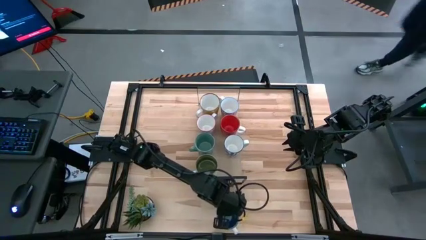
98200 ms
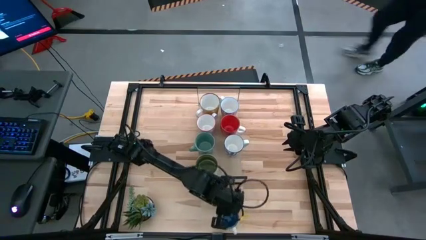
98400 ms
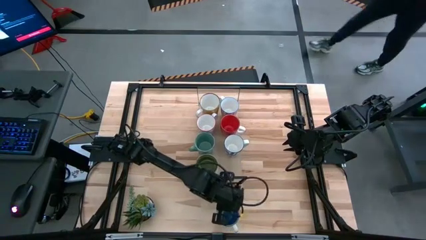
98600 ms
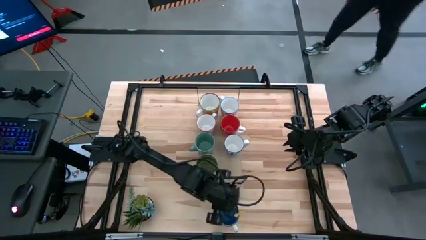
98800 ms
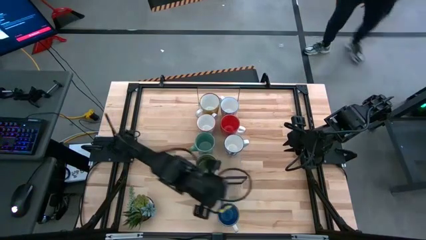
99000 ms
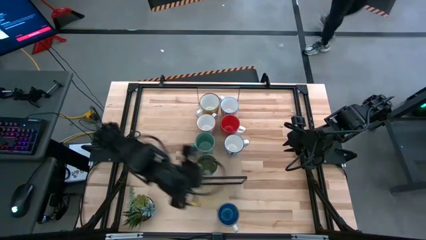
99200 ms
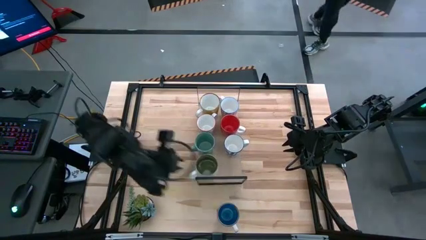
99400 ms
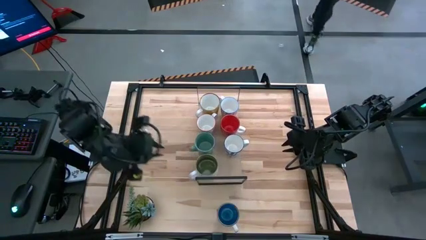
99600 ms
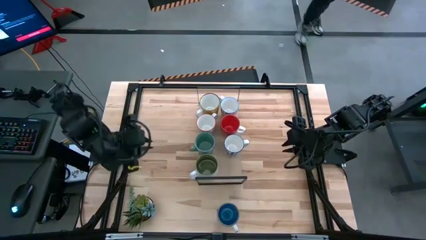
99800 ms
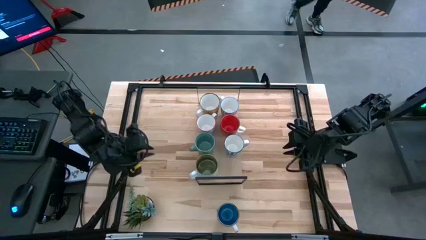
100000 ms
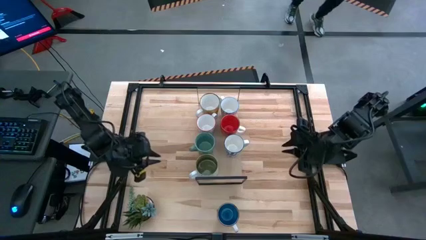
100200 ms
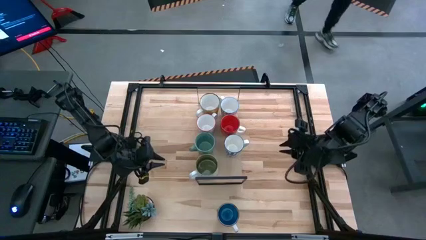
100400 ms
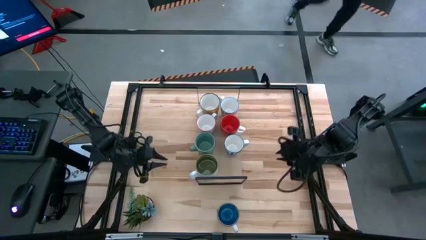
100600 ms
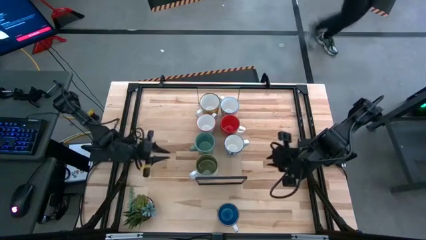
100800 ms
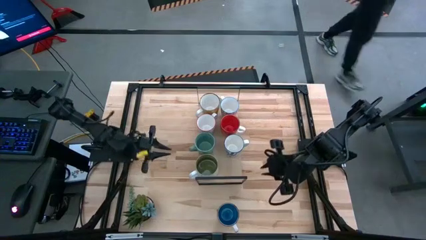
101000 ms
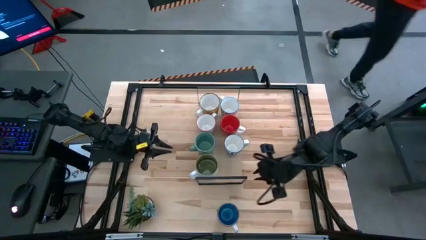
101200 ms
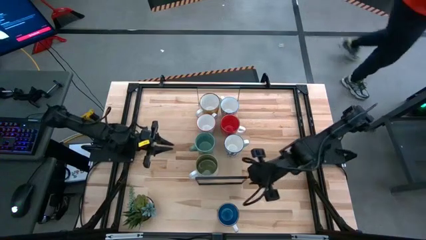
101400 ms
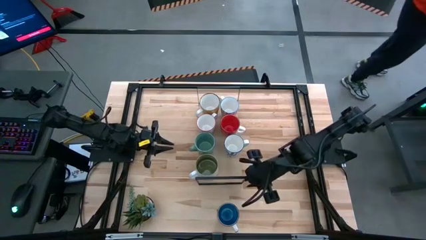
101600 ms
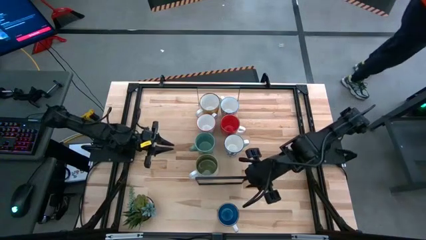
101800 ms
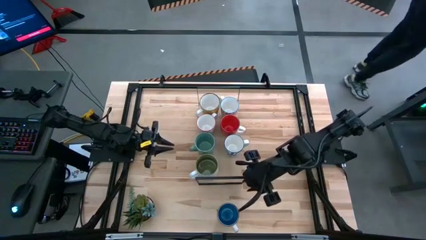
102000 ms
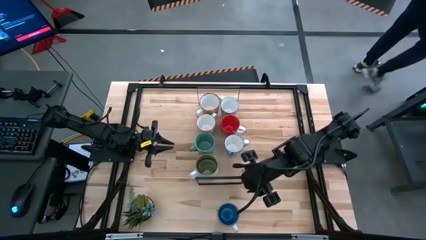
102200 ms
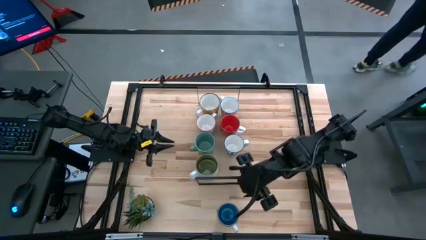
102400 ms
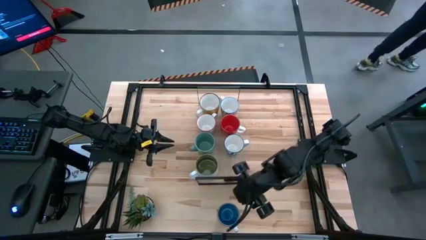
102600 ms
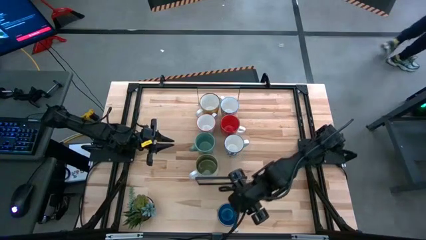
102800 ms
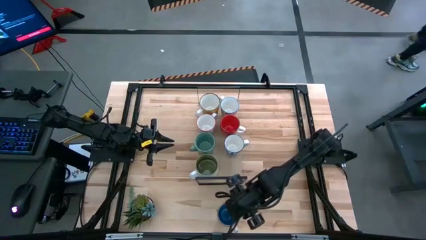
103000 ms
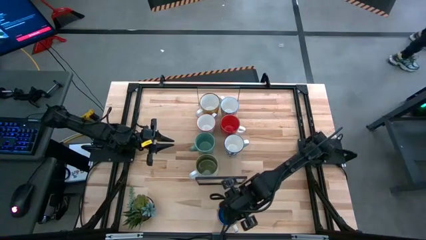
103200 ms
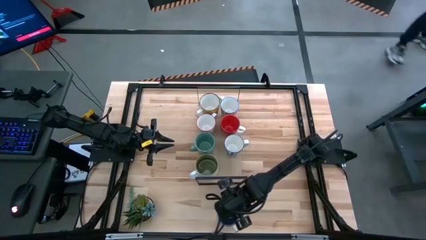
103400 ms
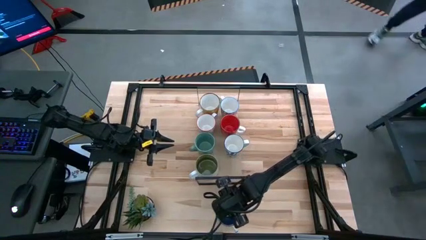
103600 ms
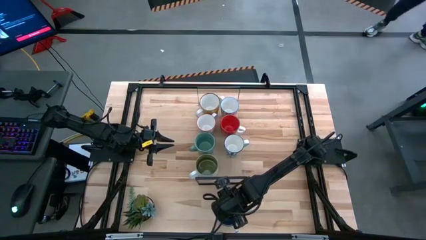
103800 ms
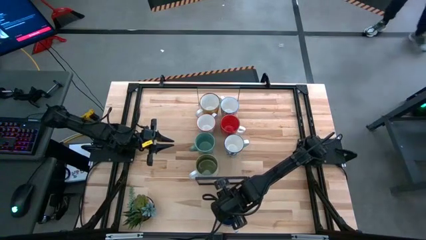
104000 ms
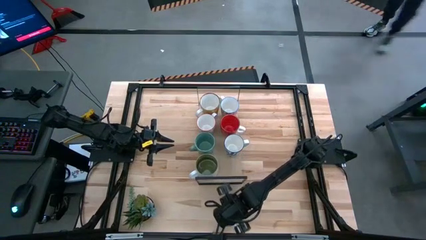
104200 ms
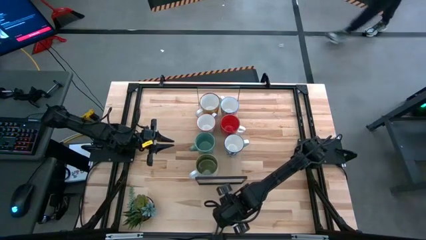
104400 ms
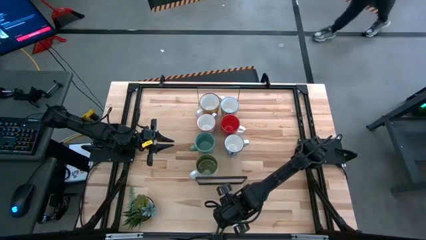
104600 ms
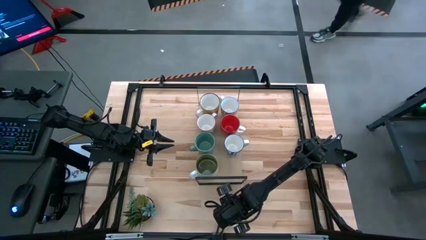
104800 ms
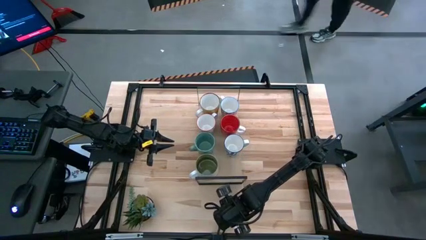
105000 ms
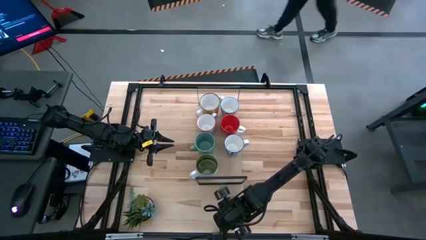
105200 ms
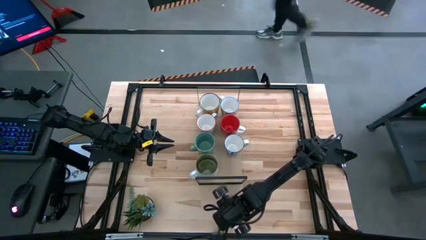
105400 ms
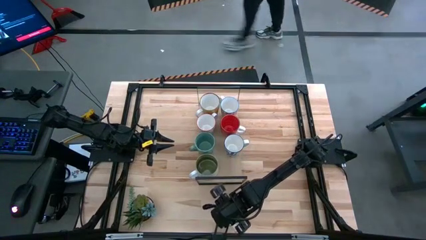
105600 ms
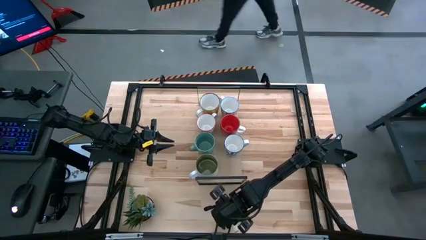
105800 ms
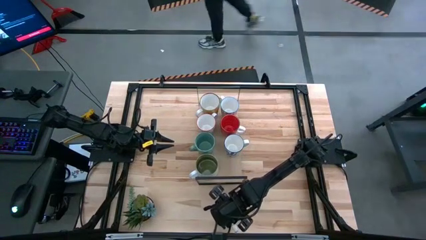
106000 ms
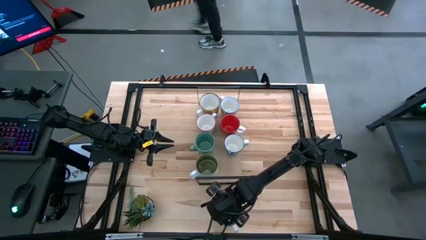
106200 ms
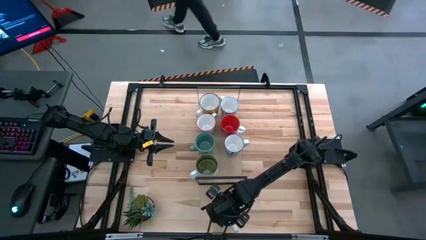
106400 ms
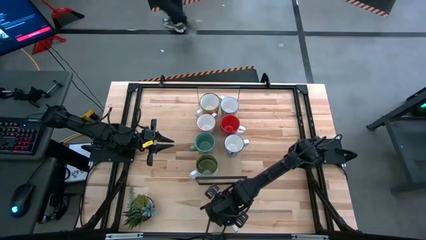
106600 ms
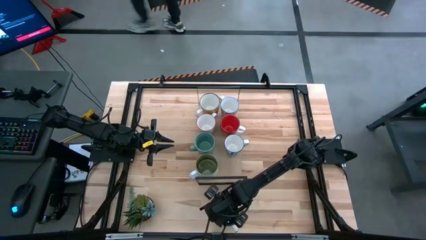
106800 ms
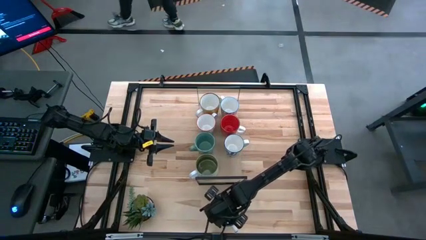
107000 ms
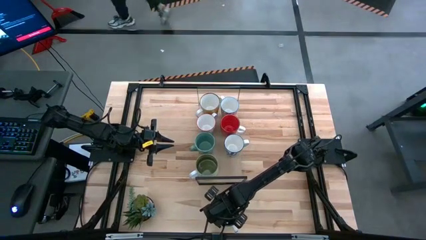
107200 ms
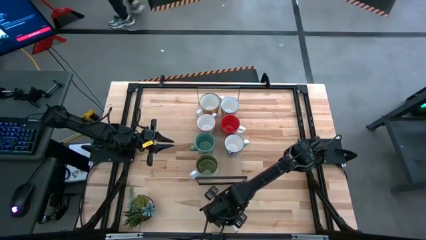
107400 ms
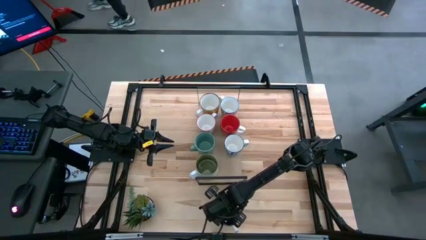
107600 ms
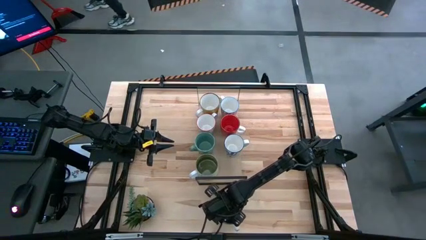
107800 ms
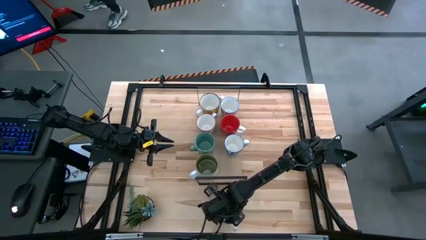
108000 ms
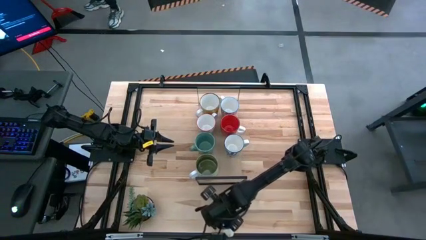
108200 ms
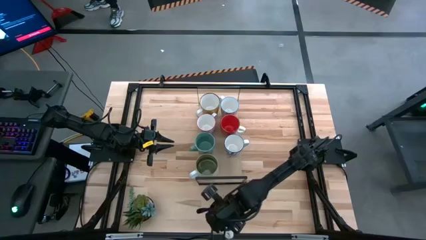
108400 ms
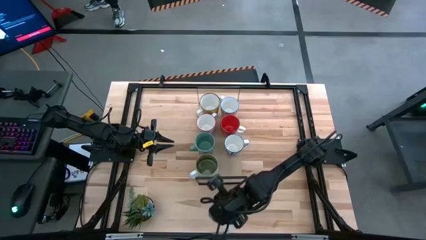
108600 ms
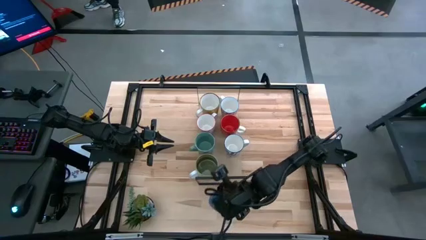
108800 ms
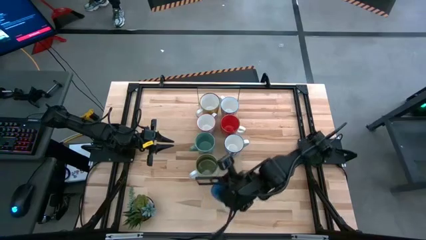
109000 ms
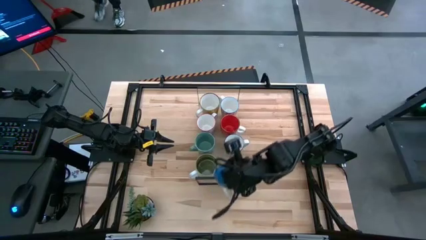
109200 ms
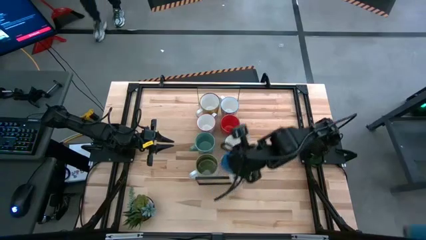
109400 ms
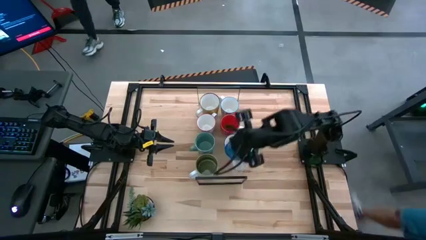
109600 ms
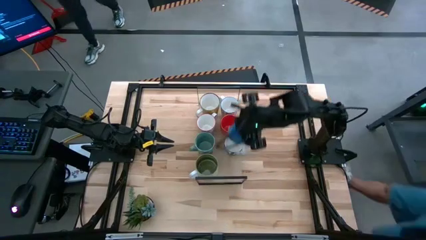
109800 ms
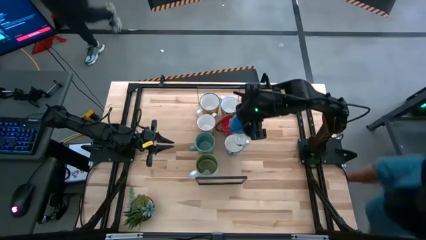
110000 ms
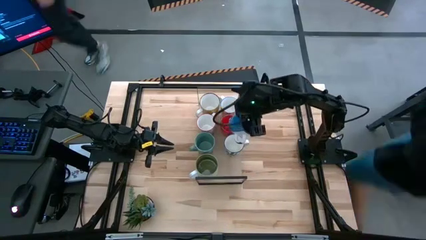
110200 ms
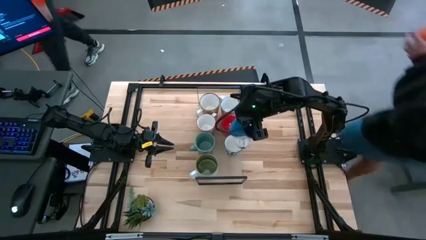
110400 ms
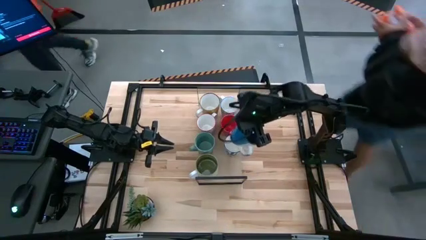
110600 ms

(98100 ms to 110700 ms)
Task: Place coffee mugs
Put the blue mug on the shelf

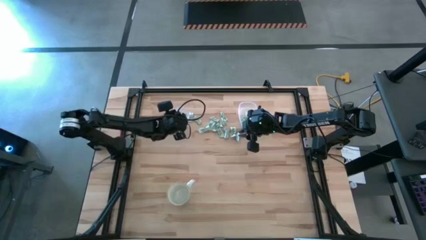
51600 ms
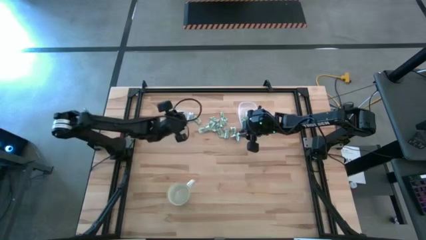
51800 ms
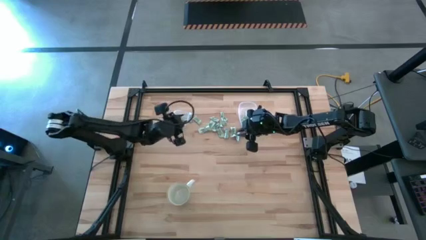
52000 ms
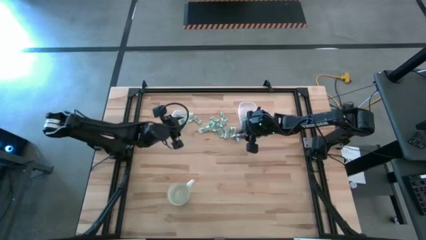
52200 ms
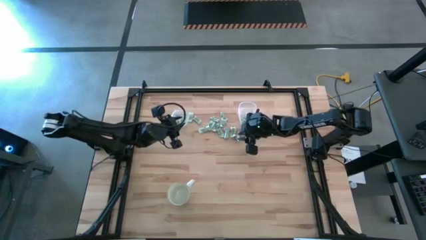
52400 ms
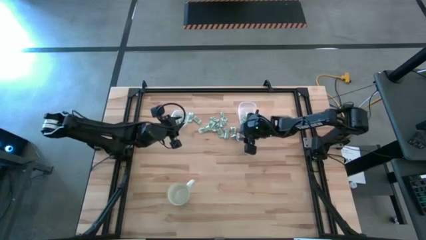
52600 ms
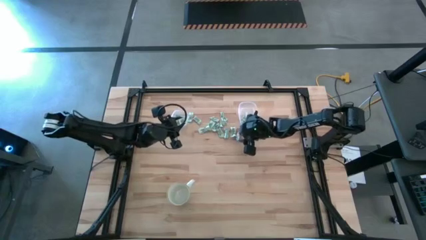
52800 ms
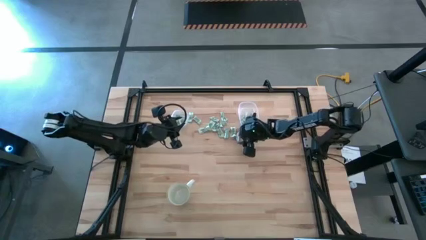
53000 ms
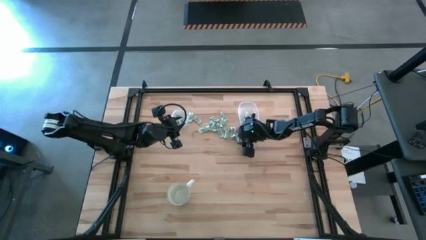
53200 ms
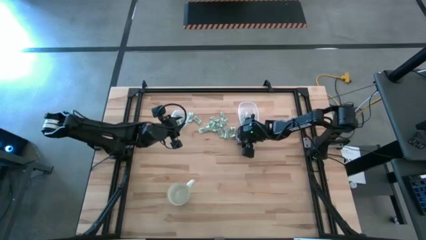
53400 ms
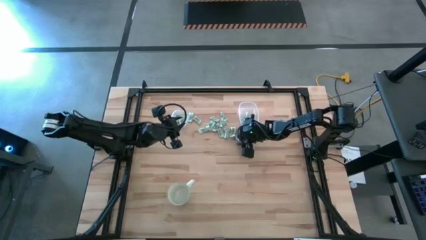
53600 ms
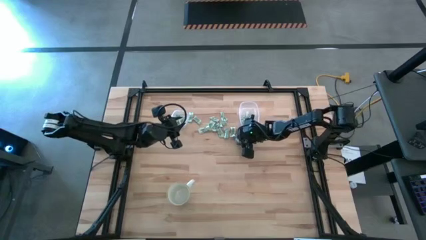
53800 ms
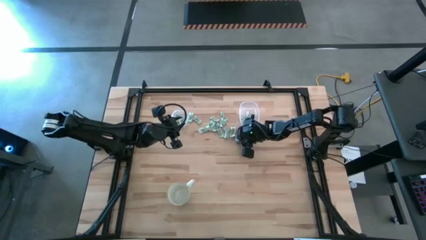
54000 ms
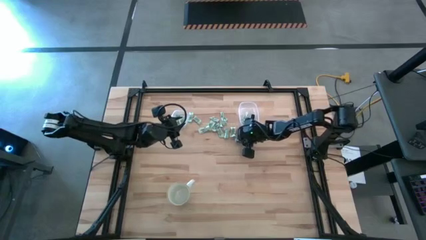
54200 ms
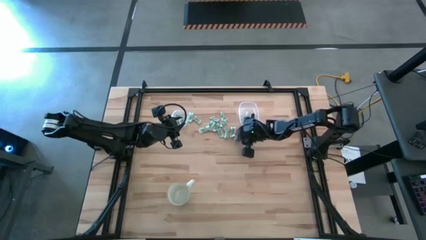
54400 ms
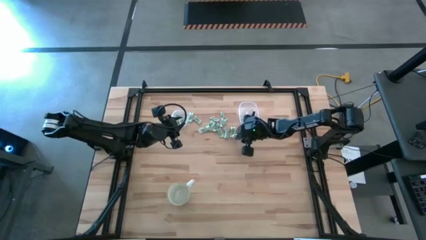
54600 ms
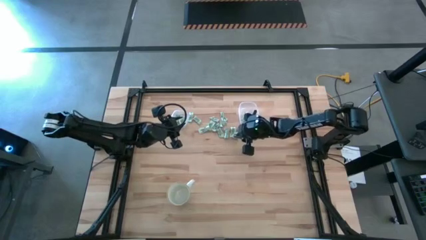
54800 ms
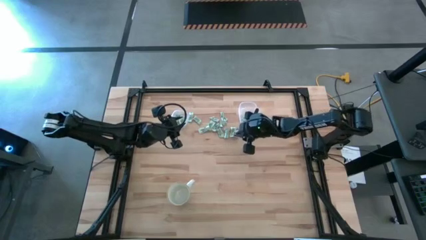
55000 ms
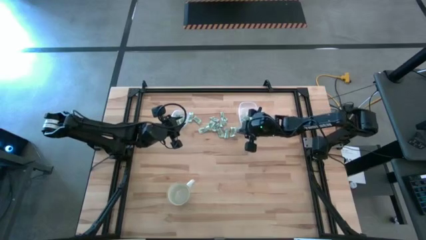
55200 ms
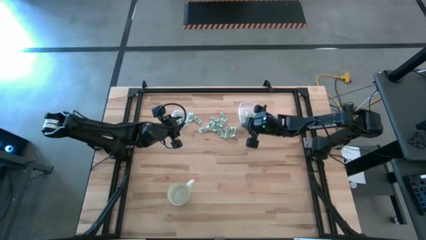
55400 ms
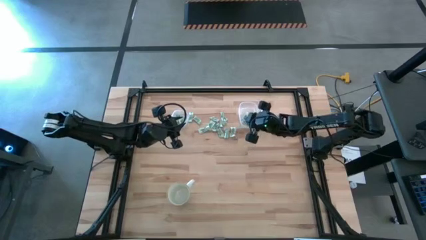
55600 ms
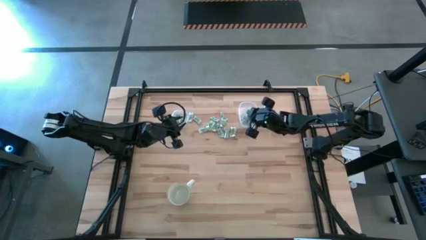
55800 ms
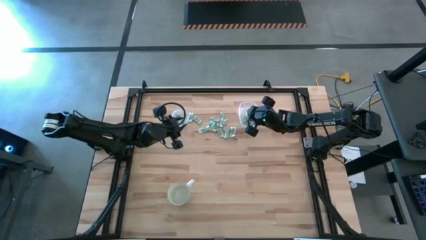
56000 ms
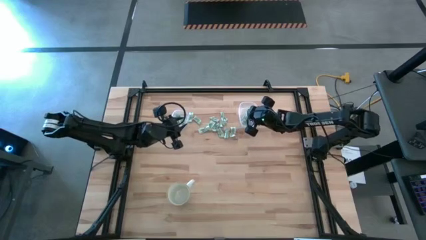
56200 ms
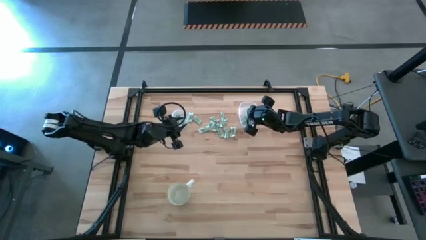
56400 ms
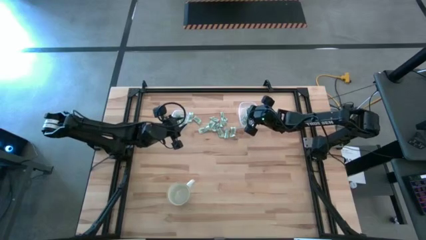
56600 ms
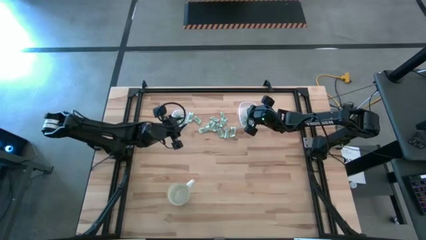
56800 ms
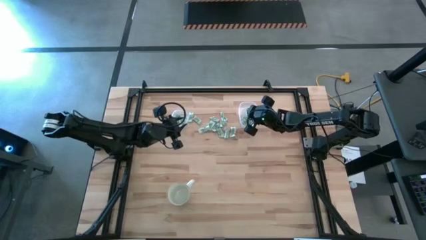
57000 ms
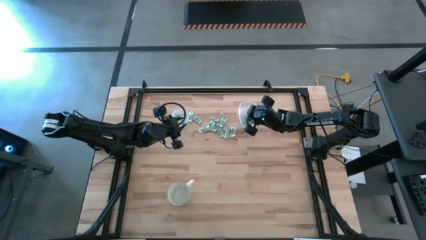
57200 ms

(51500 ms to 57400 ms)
Task: Pick and place items into bin
Put the green stevia packet into the rectangular transparent bin
